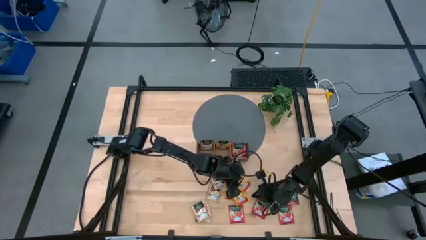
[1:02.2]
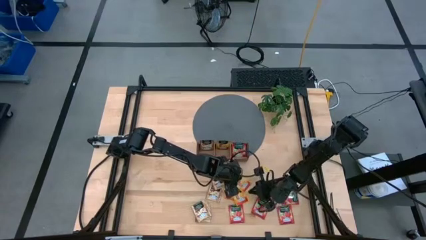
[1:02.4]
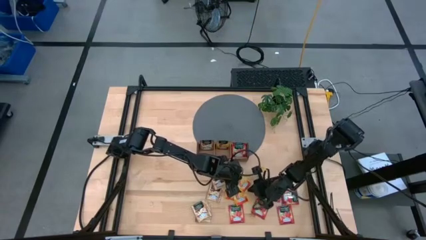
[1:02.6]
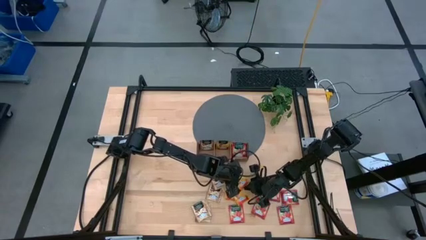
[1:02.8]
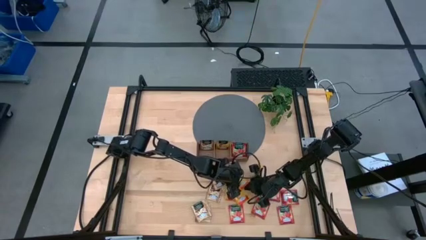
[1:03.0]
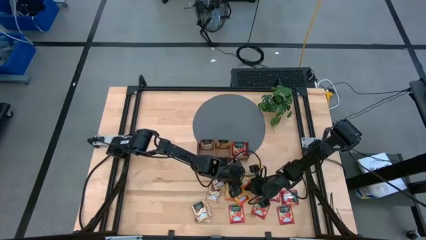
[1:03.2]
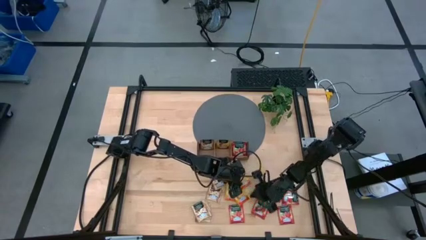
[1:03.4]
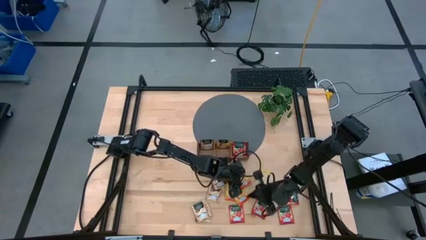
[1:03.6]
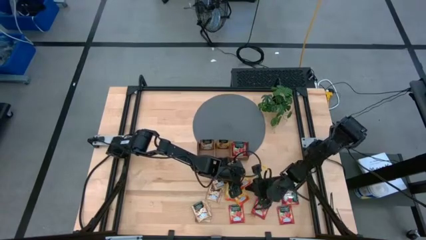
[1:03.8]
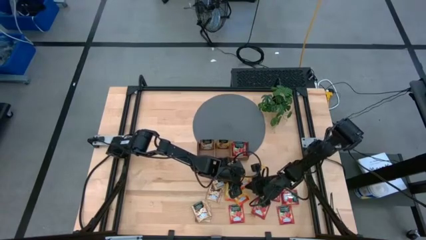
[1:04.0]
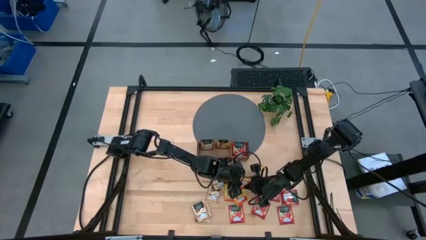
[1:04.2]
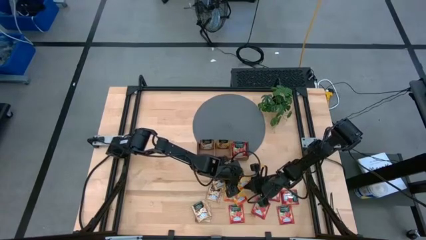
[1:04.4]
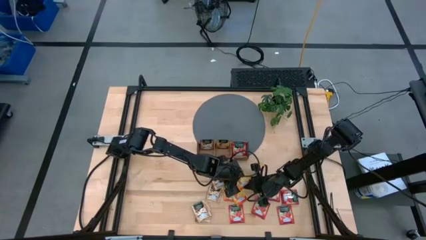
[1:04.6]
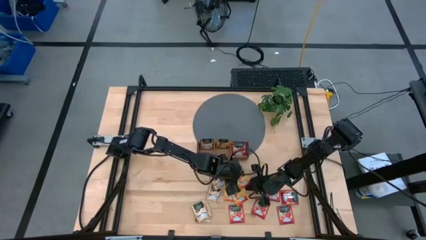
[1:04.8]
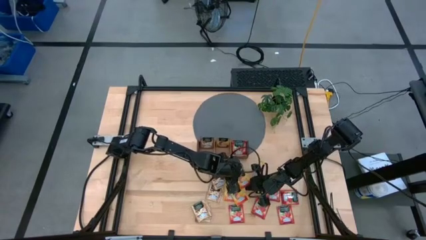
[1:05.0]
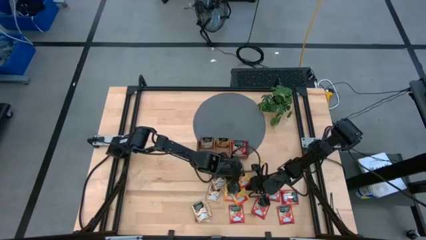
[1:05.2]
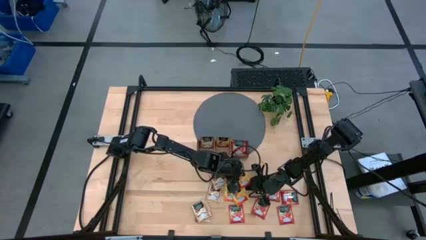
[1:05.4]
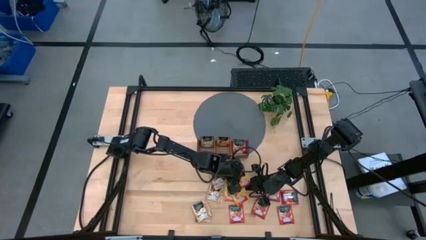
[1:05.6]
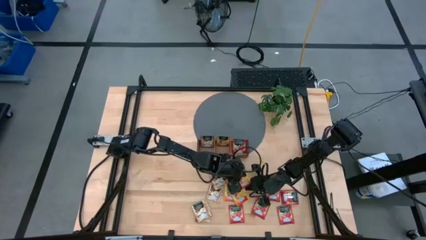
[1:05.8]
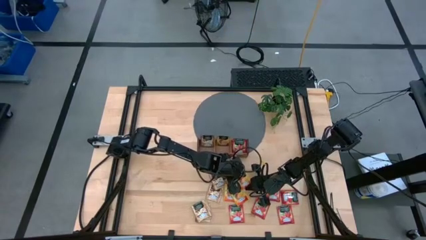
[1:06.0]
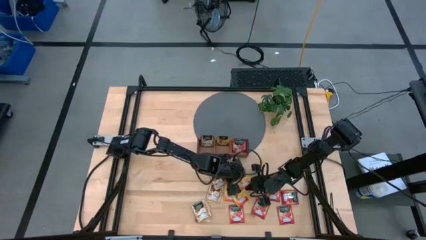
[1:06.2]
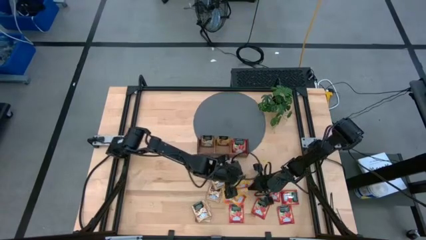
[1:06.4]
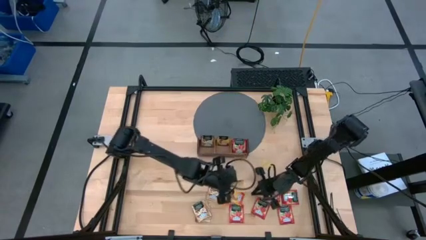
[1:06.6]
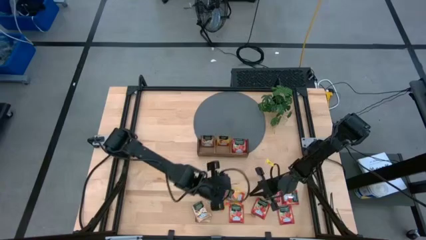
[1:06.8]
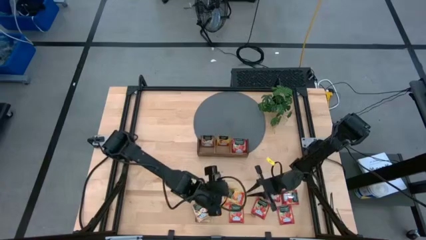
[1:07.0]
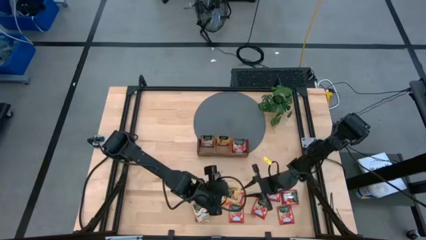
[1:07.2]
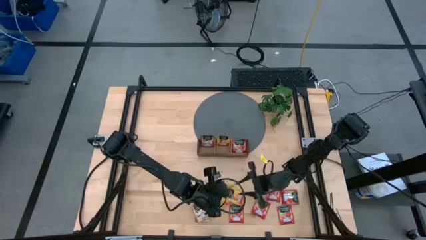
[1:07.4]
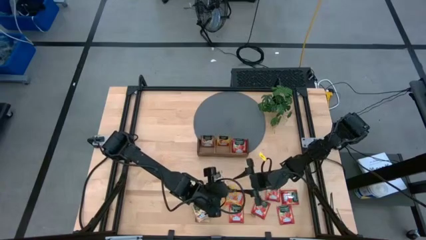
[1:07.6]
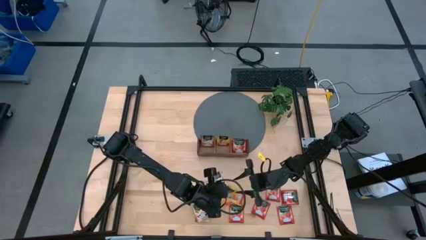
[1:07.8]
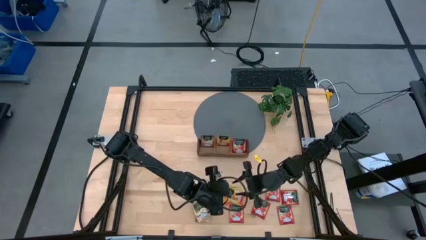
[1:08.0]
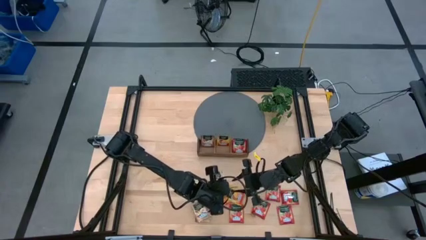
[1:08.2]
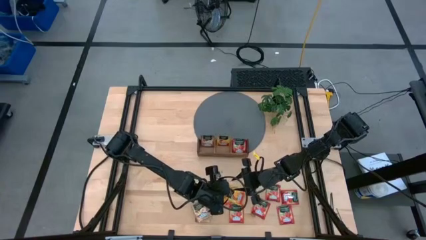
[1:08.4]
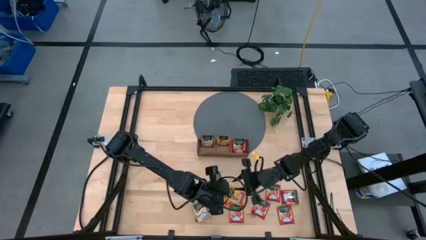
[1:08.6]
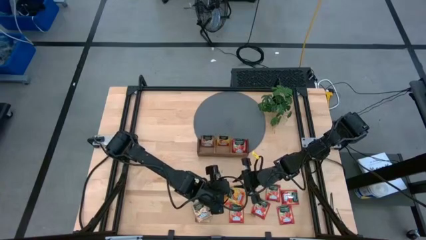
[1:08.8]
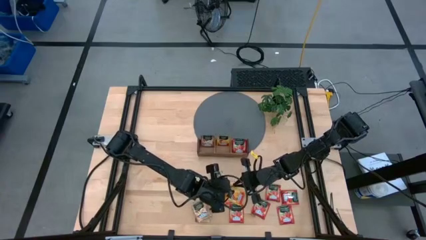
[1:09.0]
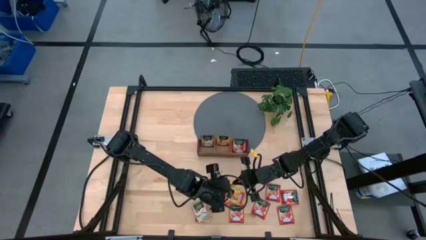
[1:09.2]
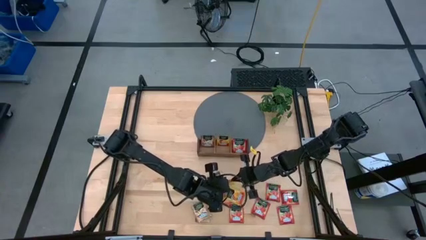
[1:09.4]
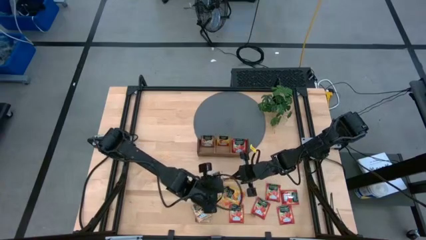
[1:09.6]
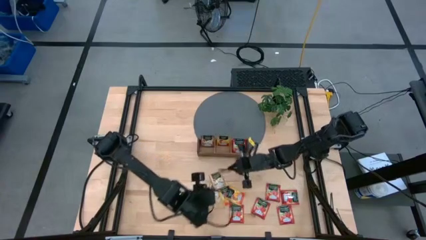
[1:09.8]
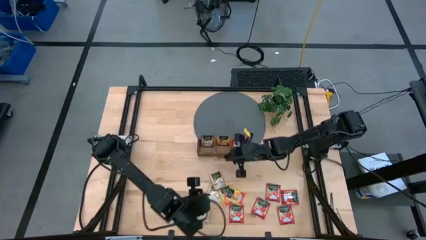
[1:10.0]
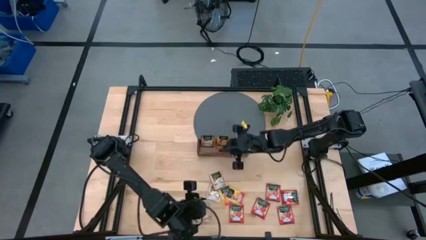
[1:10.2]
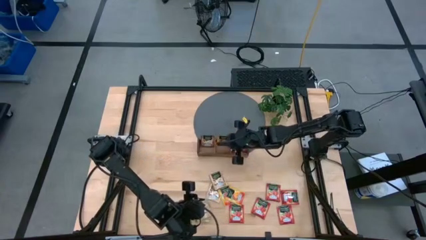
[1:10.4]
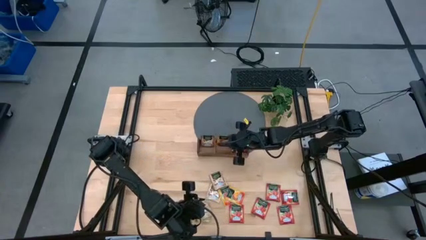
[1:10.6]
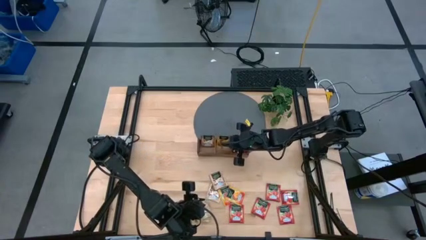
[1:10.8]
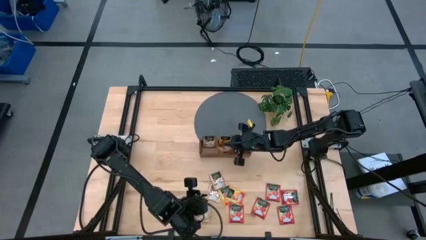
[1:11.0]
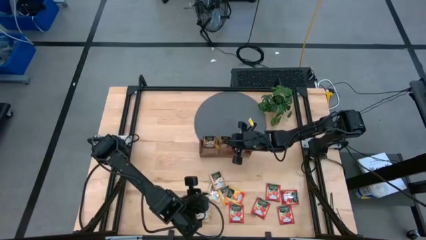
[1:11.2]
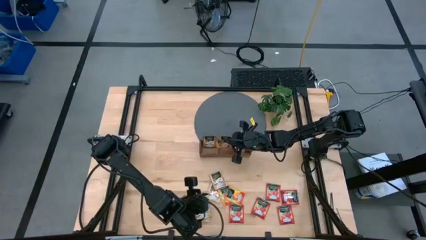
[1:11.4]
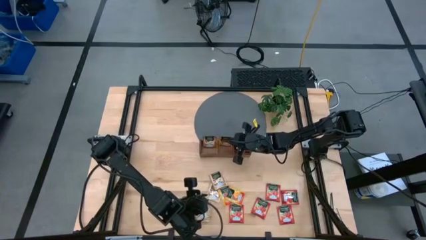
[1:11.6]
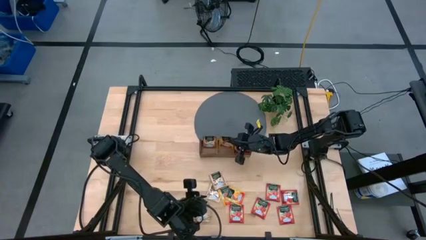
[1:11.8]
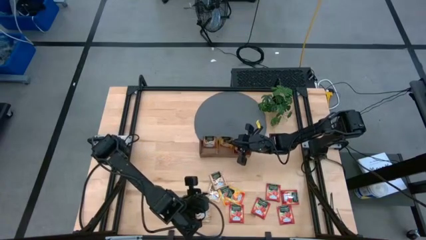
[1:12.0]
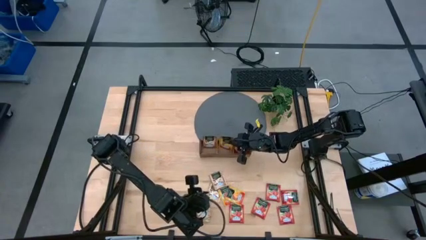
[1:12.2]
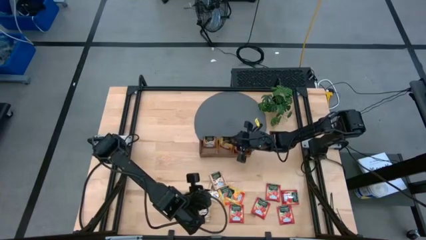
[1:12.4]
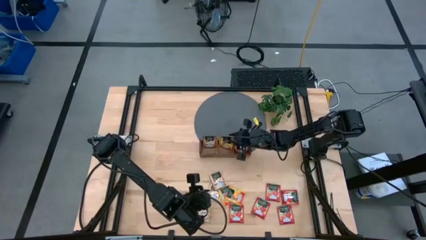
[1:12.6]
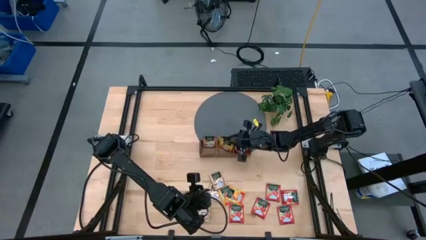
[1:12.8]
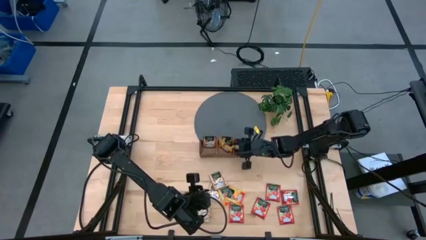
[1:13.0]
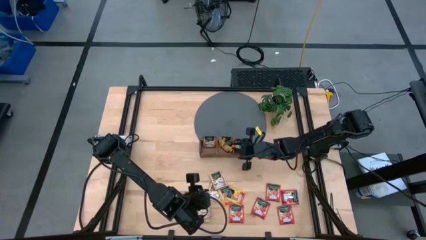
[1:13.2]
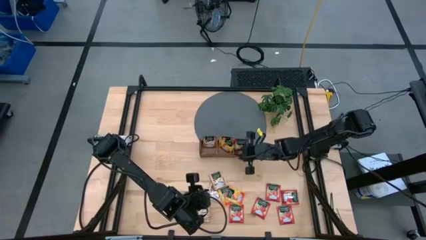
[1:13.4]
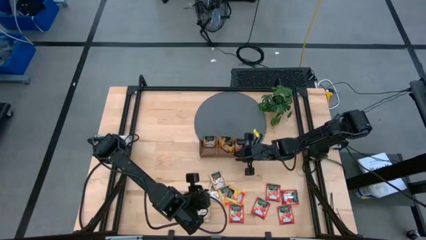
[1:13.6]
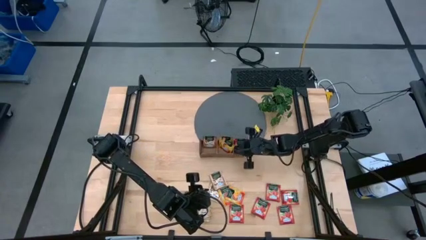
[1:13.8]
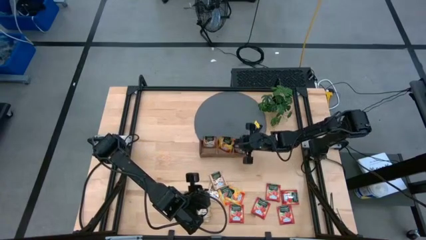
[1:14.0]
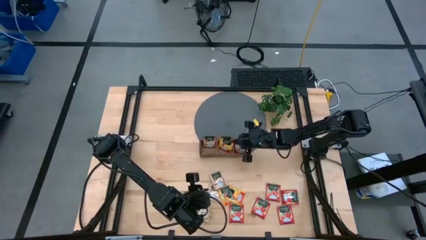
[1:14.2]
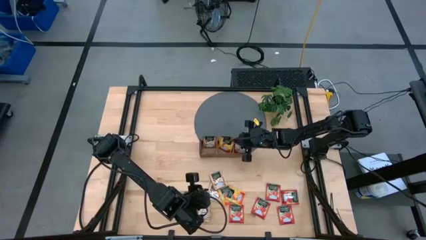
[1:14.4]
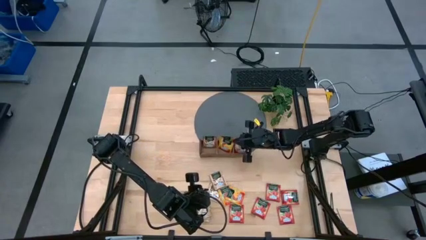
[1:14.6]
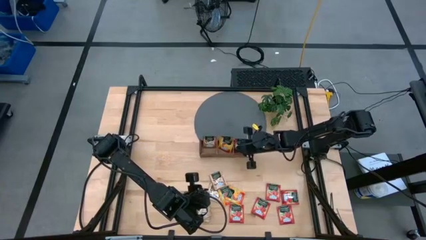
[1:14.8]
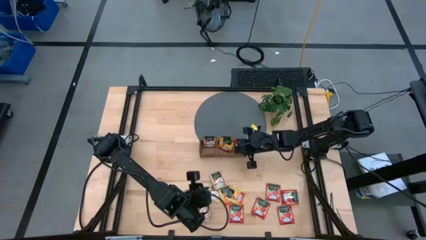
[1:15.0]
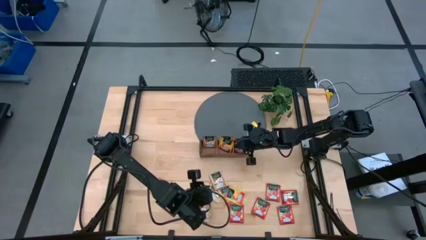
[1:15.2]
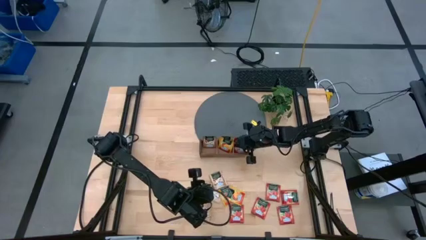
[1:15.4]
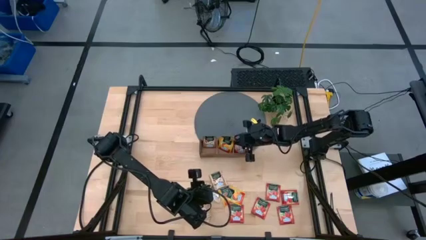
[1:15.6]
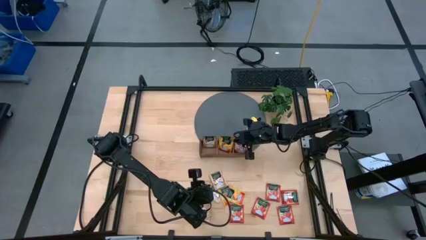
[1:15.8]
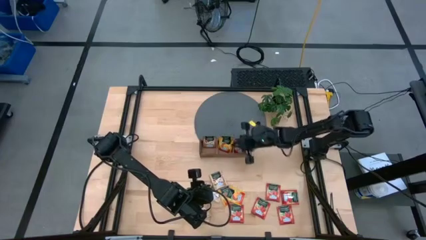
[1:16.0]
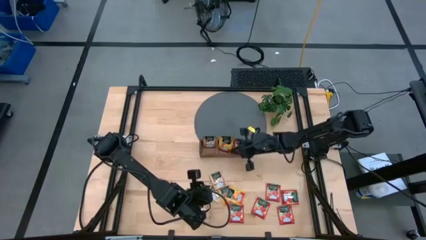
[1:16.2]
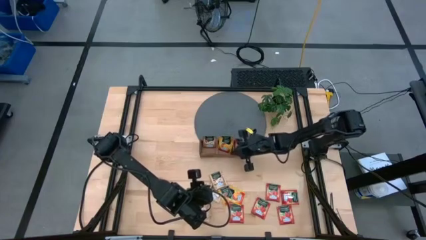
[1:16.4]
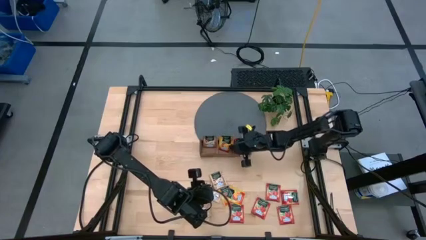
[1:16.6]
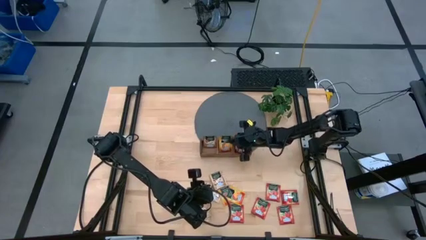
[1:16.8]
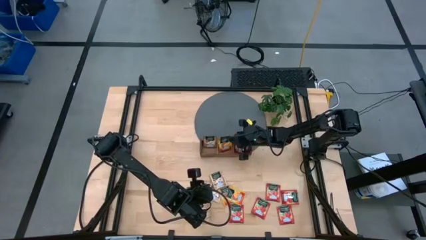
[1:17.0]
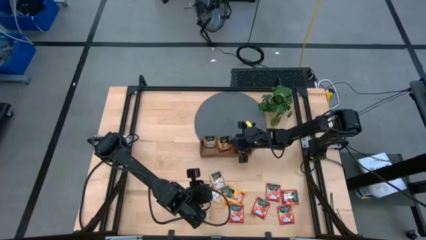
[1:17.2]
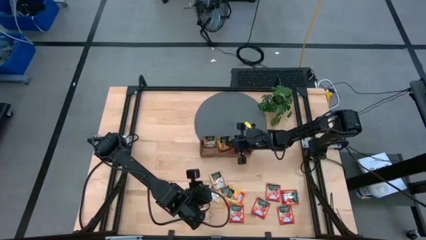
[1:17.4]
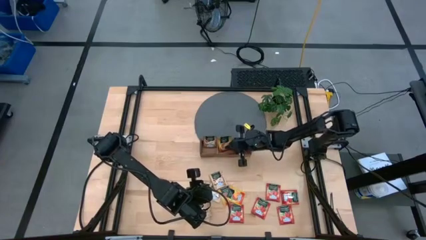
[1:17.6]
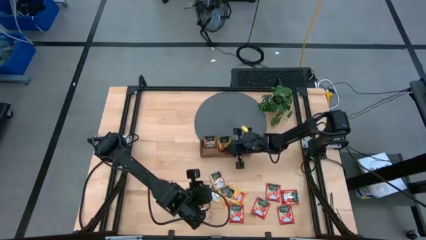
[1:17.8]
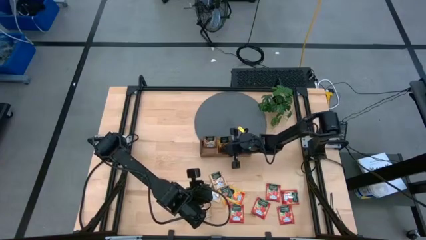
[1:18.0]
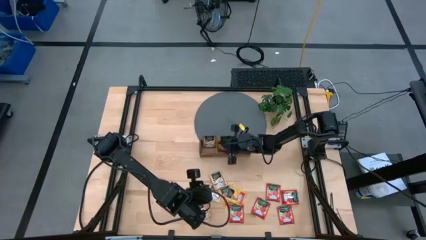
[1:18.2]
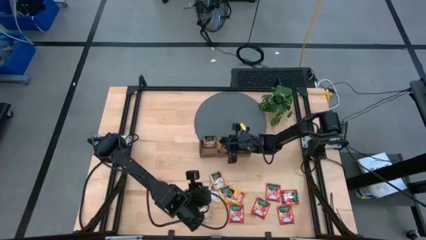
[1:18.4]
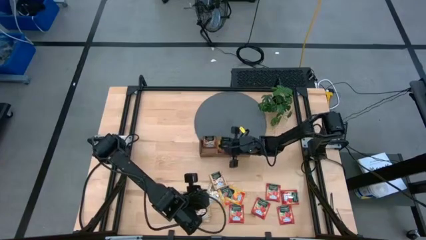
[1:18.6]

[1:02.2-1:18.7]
Task: Pick & Place Tea
Put the yellow tea bag into the middle wooden organizer
